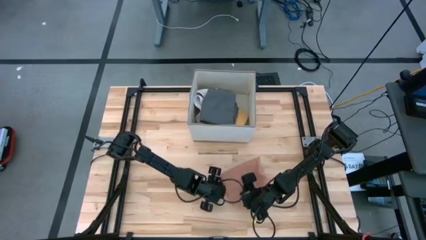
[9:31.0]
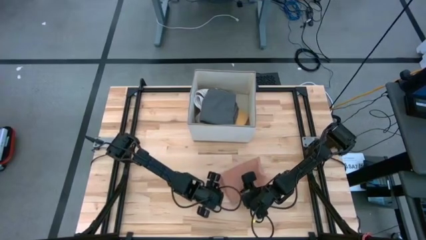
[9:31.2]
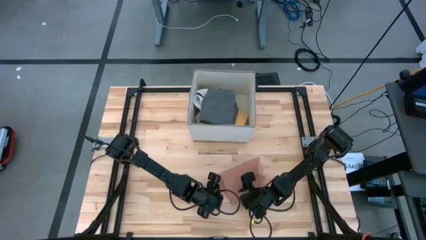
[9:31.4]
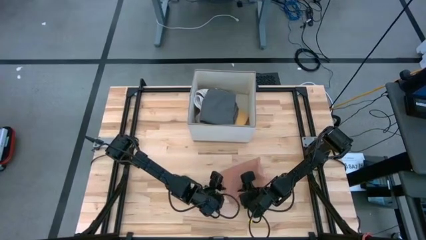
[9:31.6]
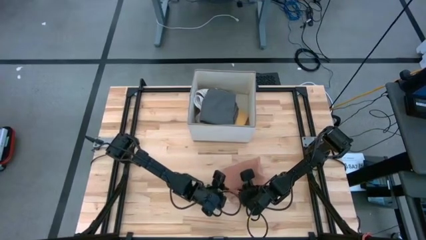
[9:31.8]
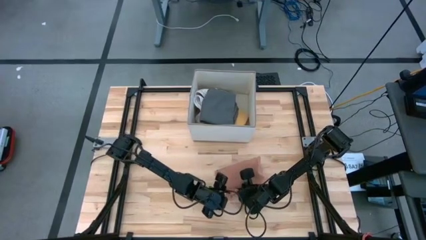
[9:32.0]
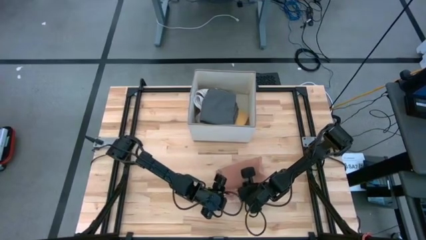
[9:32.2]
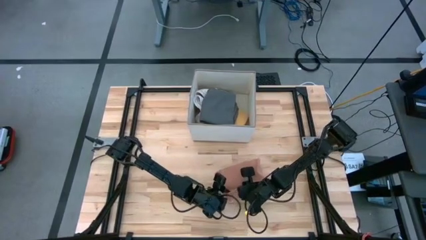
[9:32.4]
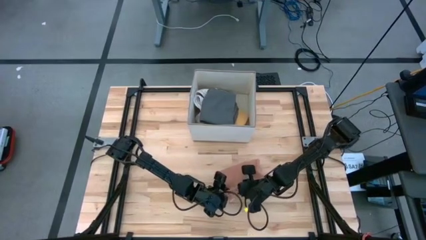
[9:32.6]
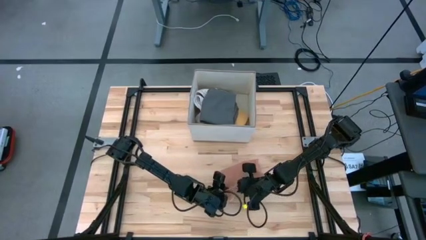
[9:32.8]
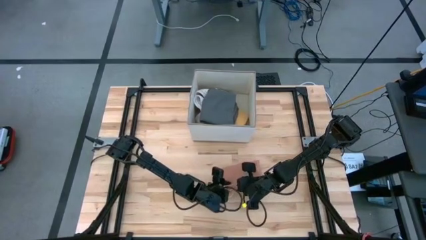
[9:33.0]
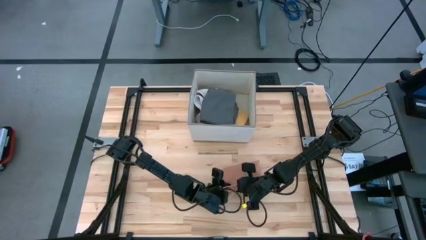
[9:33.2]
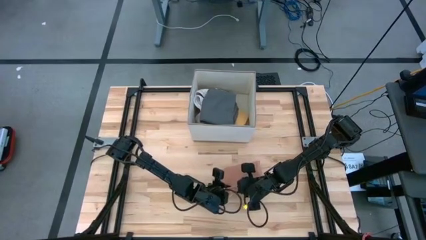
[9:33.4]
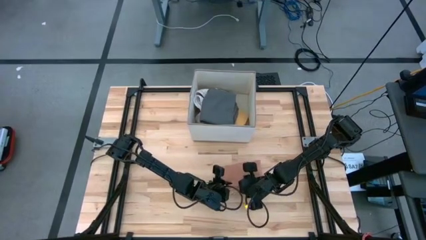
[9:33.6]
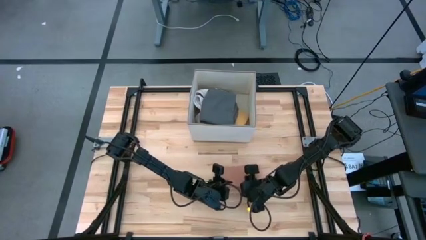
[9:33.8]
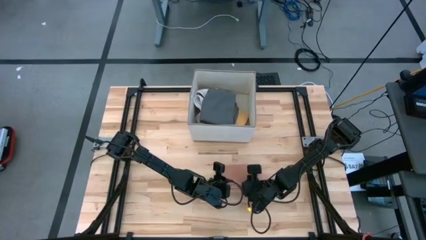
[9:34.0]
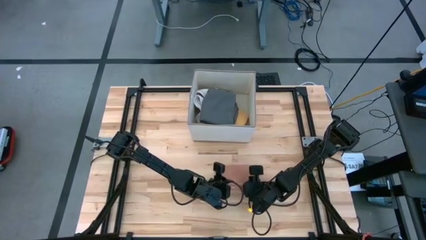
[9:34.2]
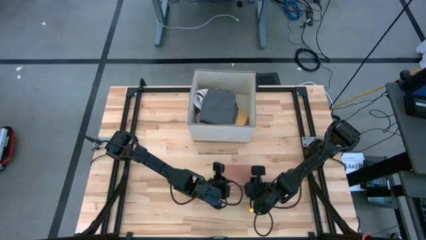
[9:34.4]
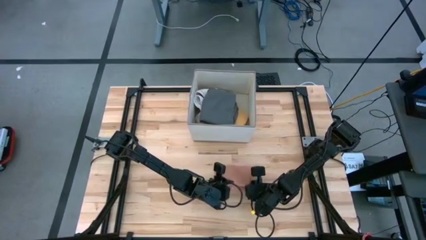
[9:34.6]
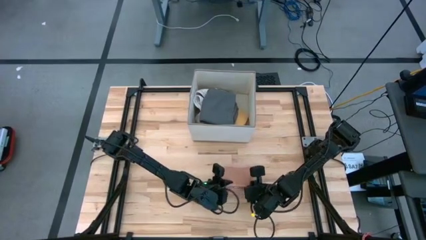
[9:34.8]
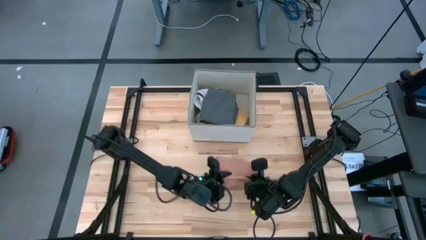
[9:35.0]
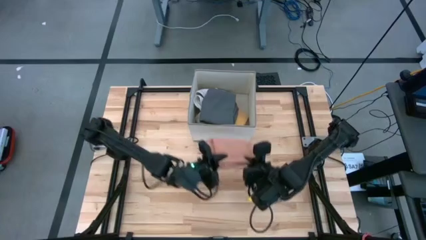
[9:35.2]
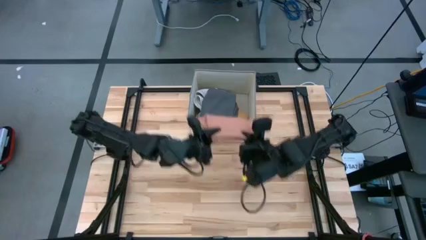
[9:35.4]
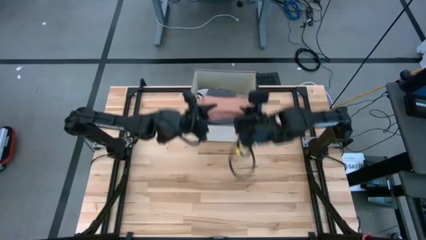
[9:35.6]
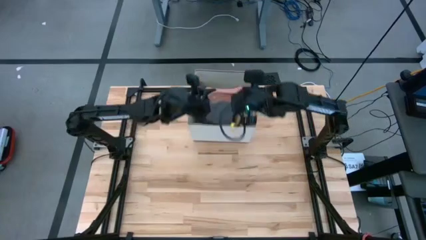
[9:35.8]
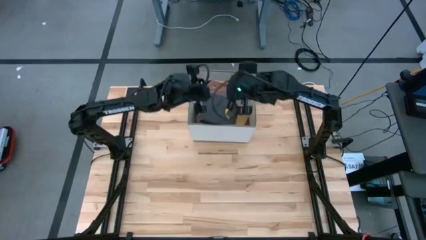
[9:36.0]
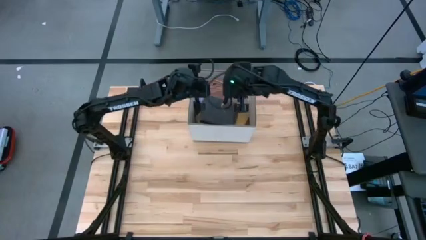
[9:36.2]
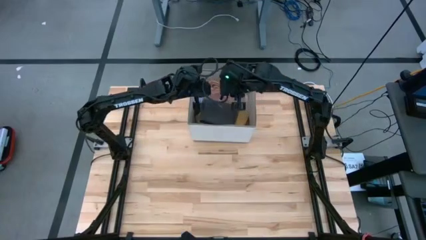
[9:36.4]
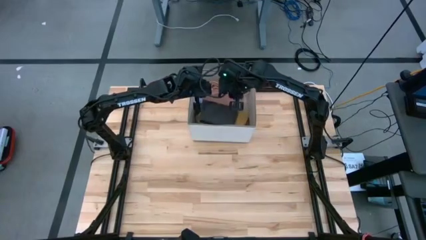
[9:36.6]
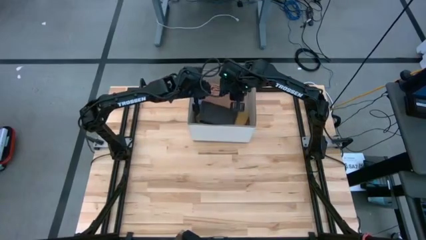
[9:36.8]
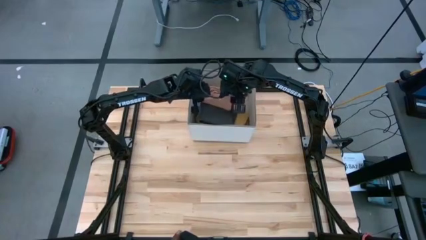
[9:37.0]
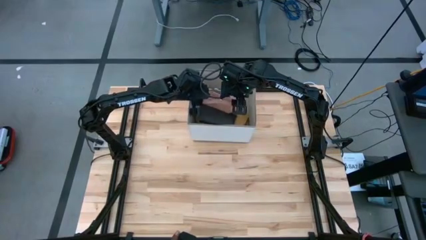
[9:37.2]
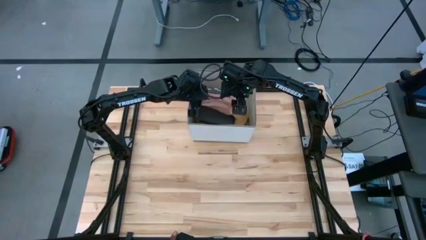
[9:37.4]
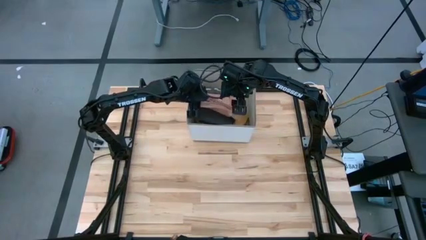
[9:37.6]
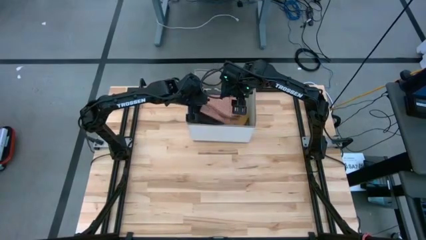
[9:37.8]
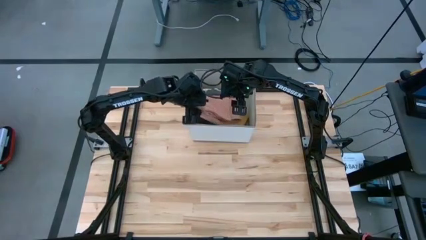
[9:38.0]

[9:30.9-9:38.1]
Task: Fold towel
Put the brown towel with white checkered lines into the laundry bin

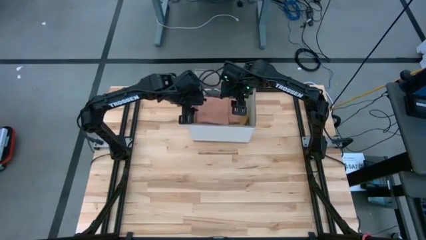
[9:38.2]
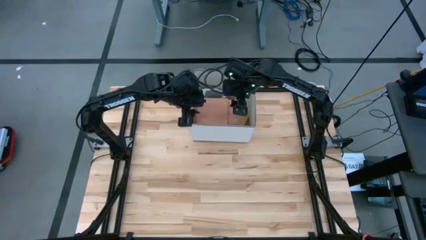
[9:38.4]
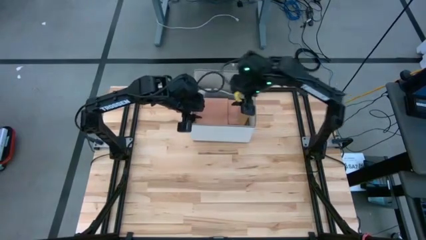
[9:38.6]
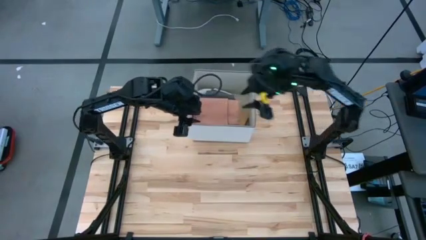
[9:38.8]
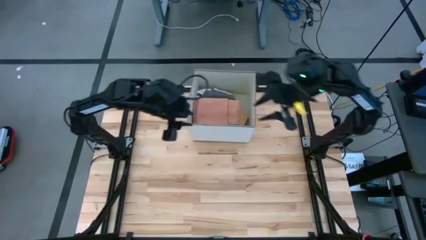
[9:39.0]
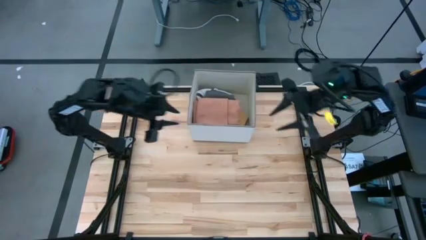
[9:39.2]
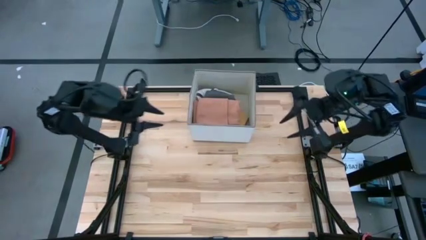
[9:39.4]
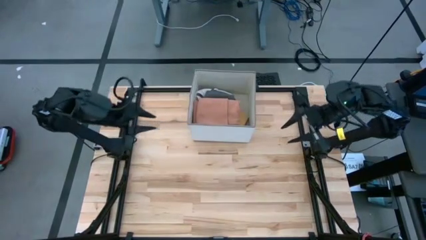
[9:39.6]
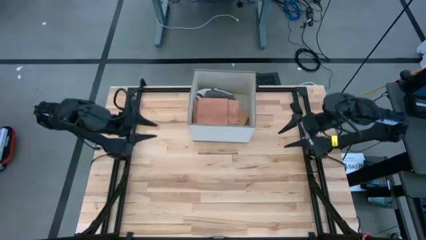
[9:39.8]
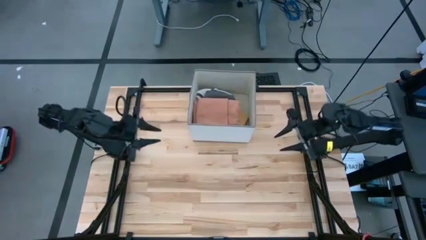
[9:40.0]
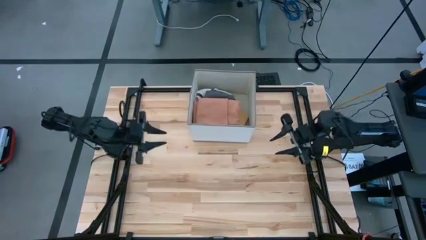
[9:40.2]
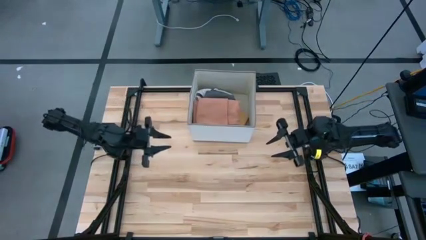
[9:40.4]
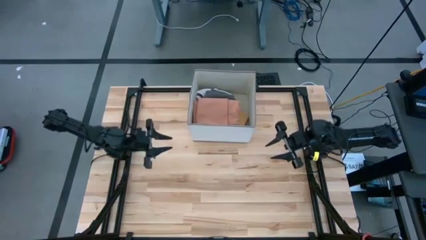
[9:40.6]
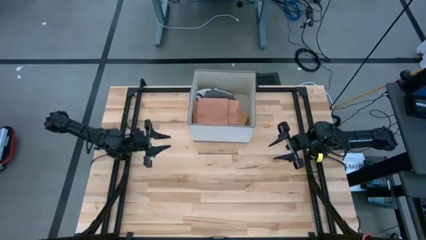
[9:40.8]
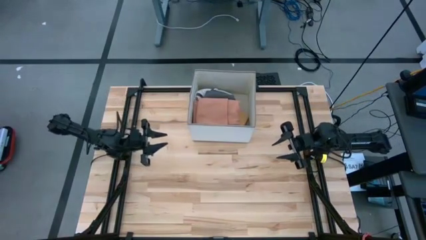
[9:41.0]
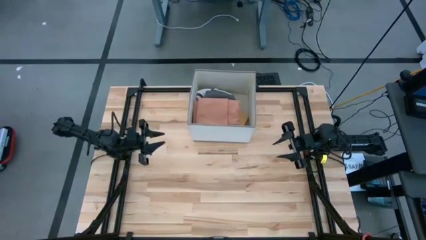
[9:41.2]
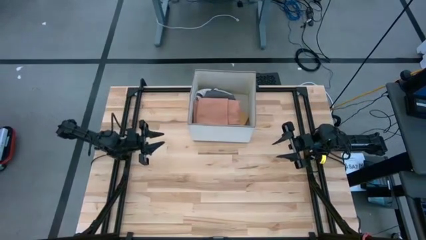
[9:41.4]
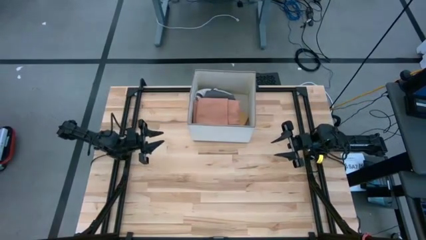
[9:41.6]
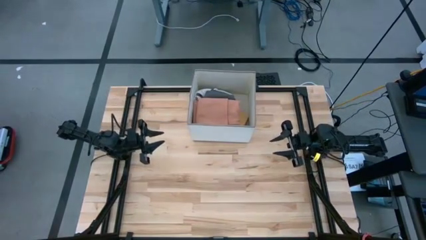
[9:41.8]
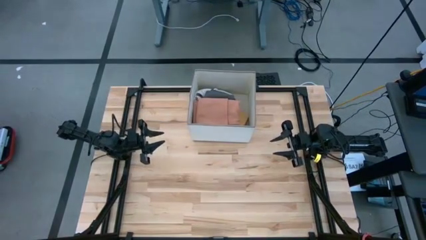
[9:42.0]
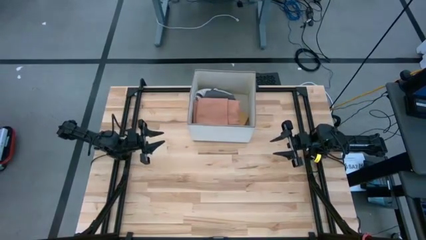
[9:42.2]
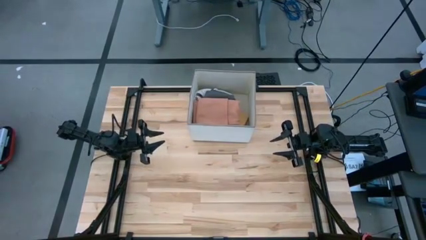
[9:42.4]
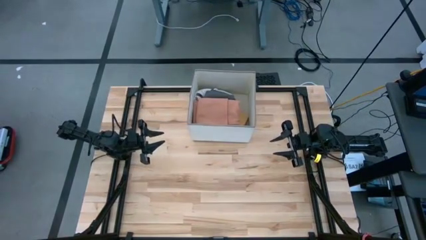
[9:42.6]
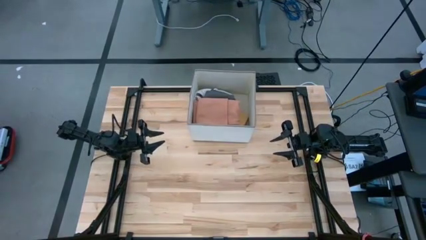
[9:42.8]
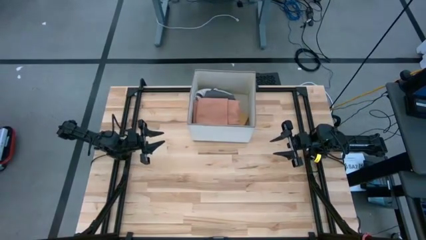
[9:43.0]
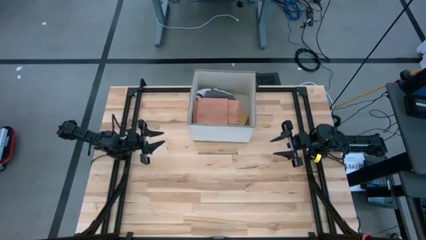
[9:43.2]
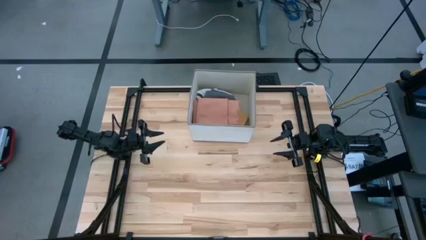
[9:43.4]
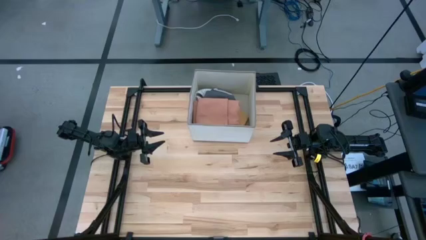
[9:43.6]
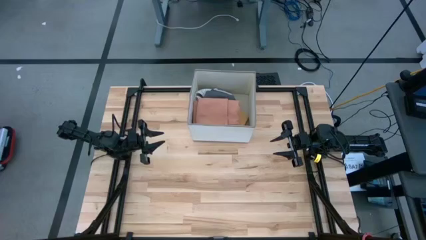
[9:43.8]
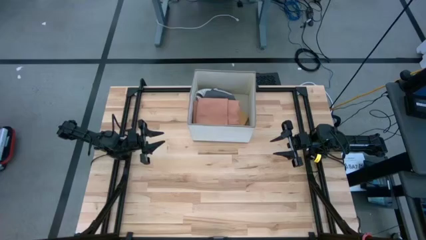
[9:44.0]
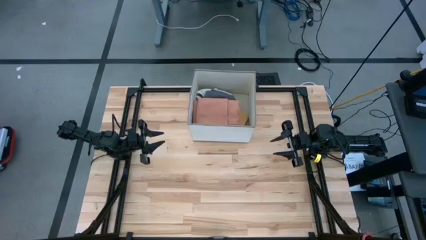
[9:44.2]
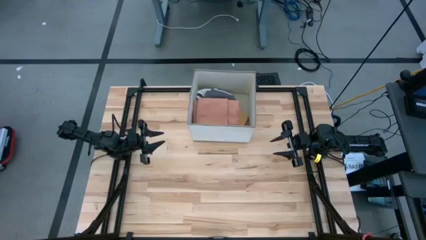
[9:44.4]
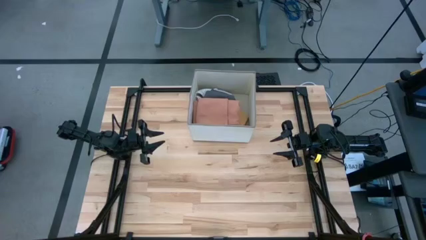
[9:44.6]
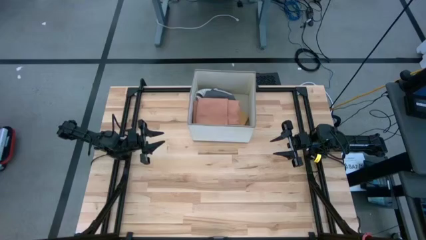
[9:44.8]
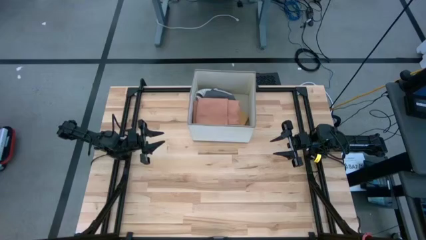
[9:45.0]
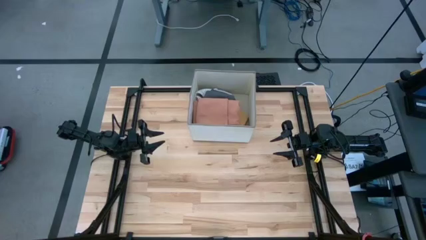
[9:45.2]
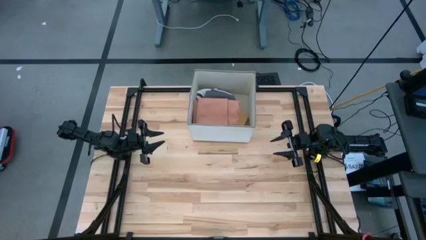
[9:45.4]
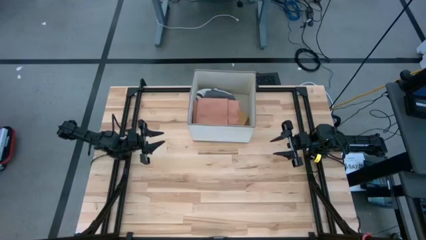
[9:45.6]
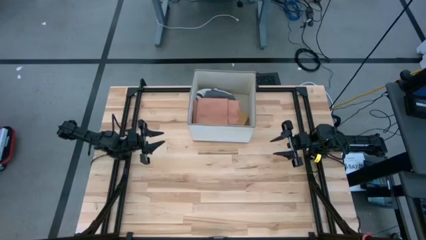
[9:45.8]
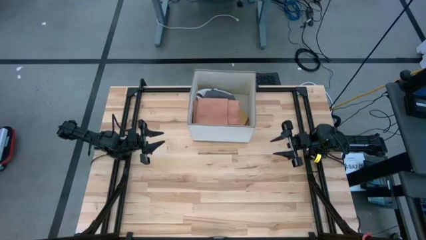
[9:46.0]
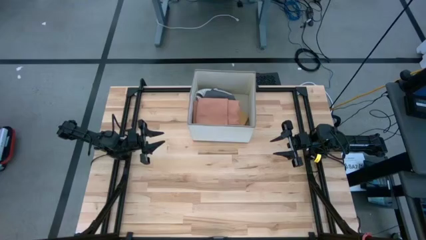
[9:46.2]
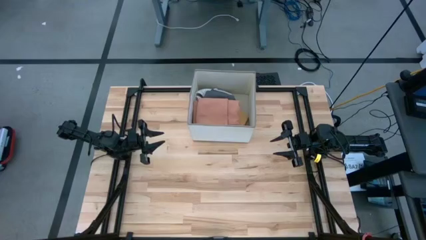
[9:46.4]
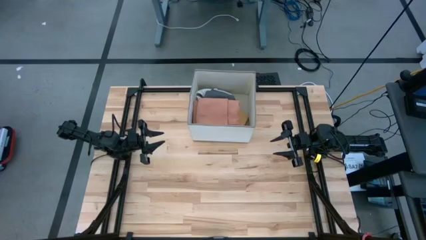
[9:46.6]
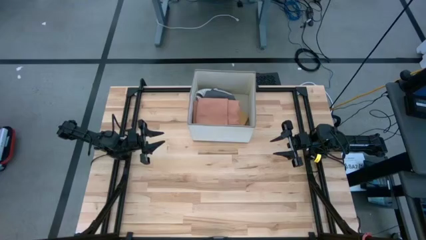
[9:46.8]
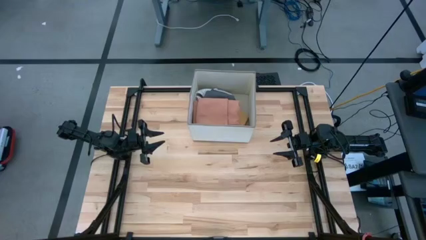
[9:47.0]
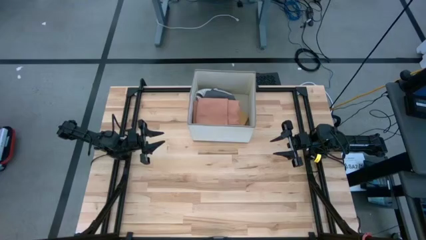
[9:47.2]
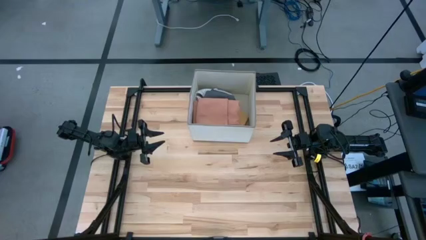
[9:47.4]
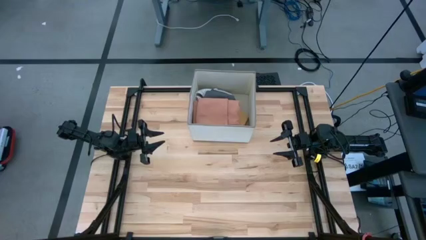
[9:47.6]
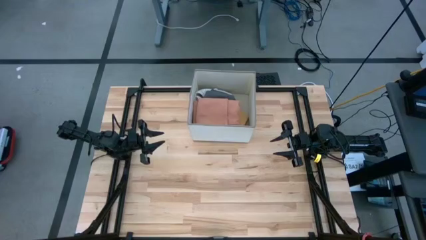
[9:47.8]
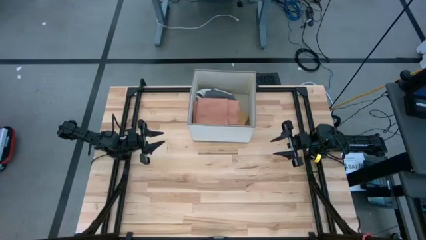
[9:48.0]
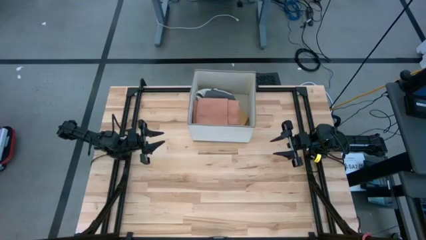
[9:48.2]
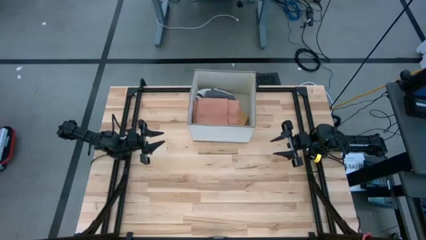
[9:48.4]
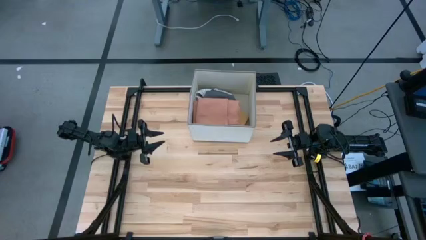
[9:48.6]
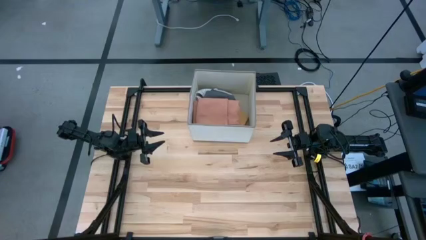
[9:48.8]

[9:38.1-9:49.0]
Return to Home Position
